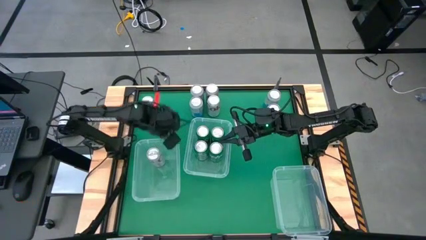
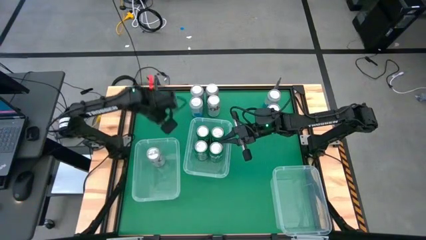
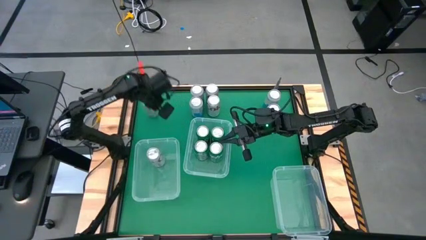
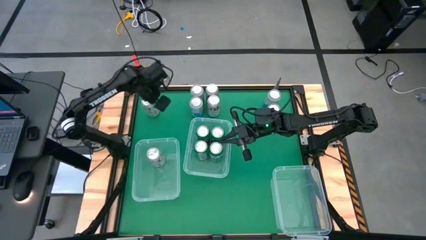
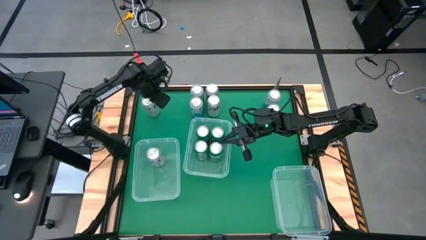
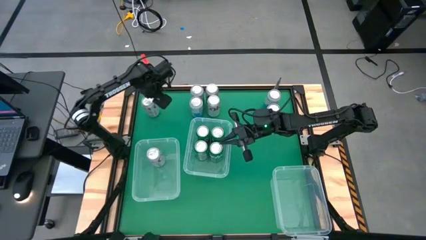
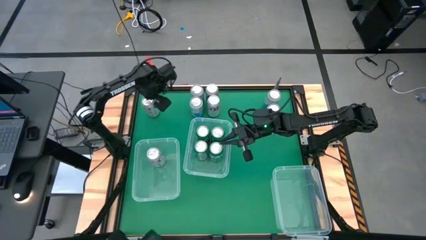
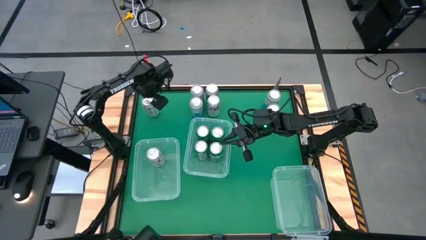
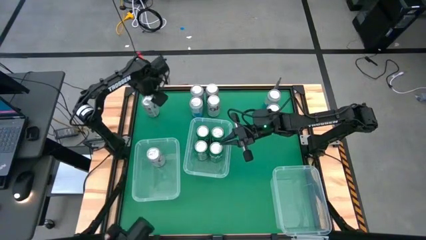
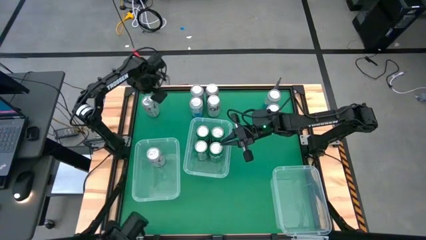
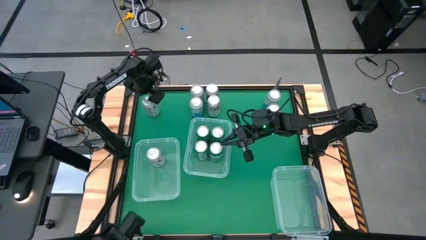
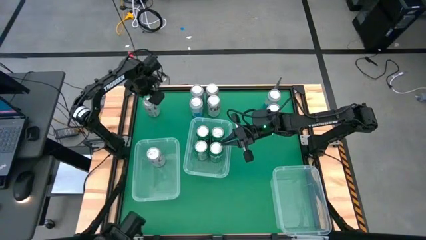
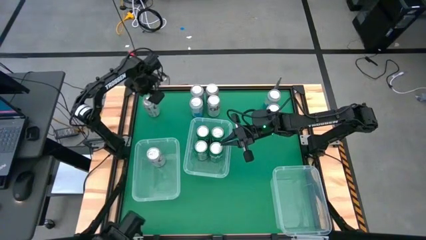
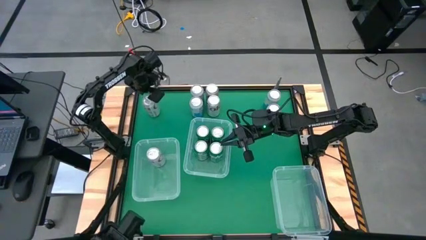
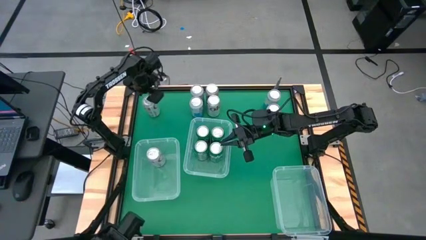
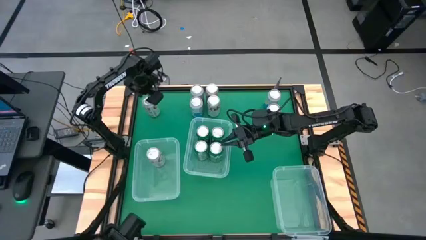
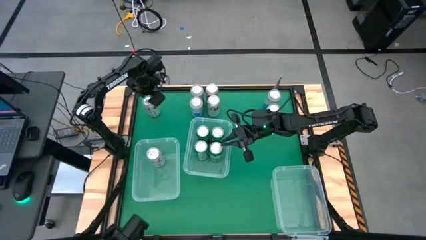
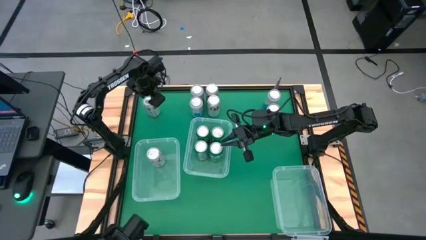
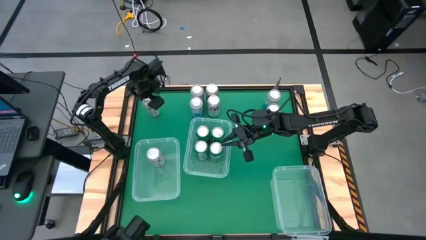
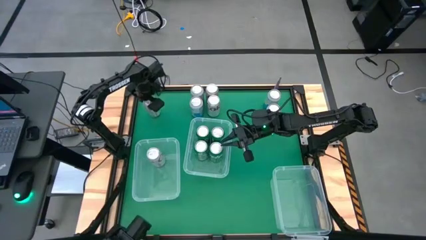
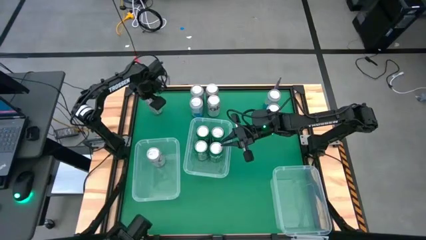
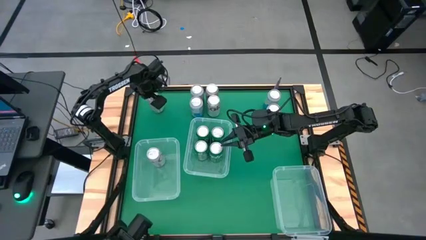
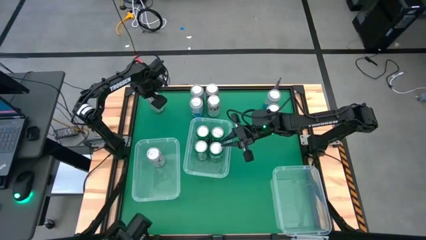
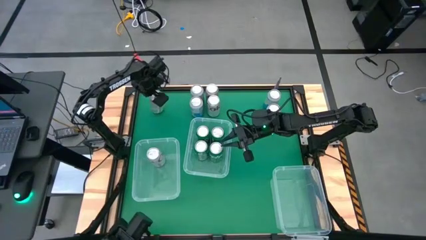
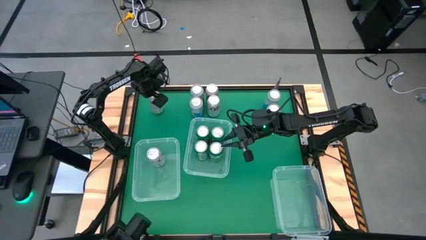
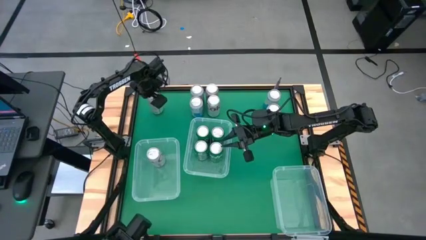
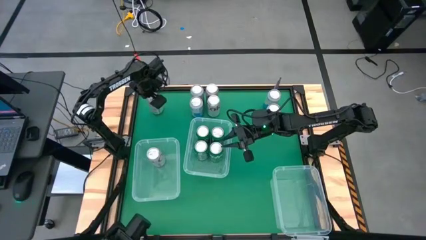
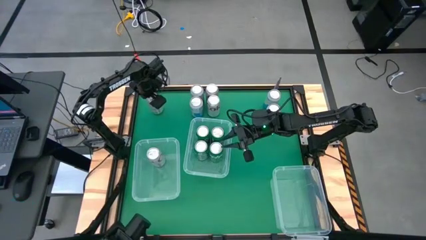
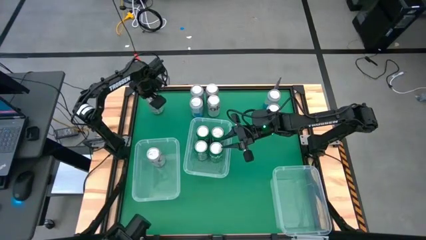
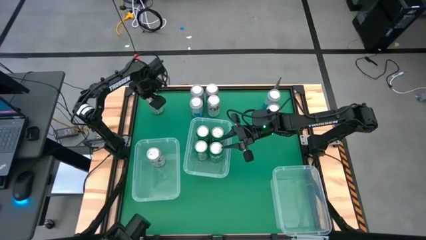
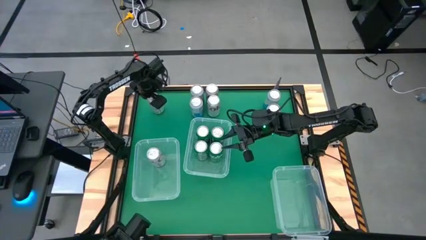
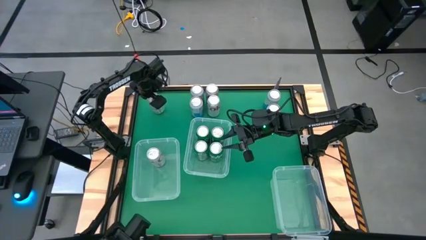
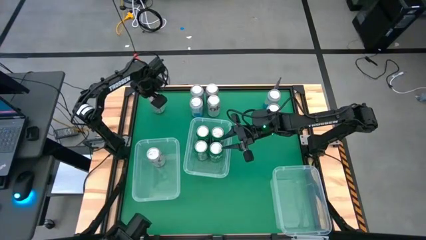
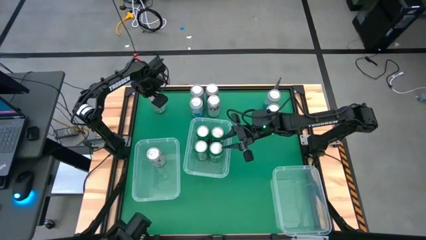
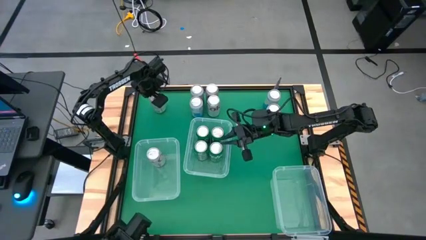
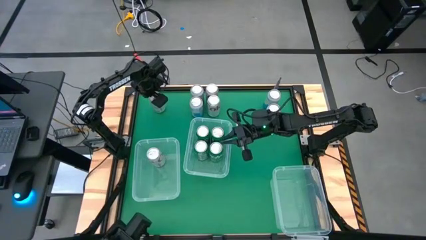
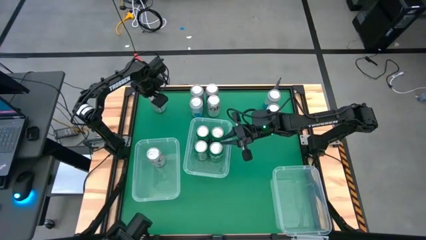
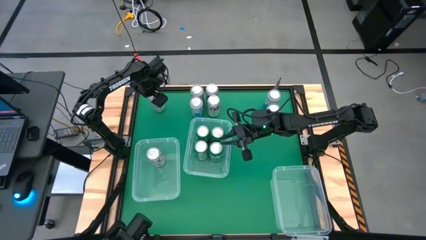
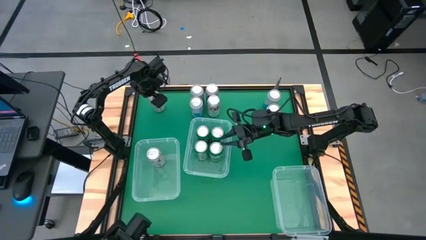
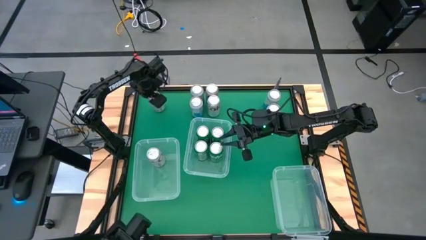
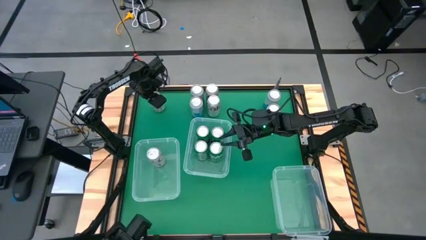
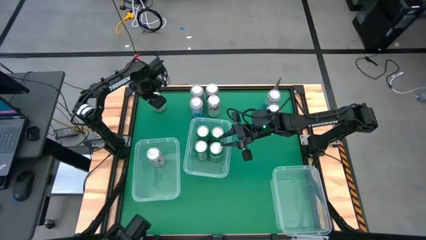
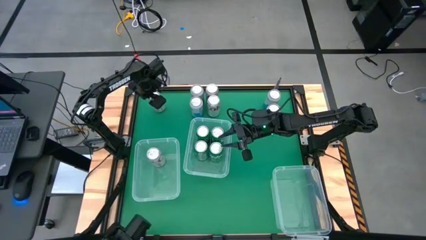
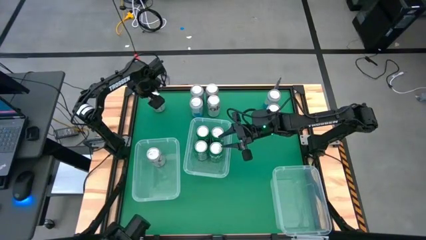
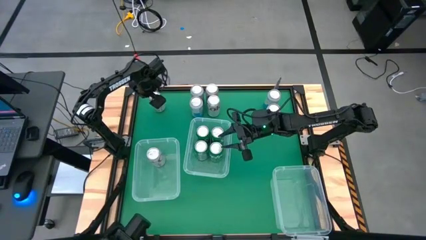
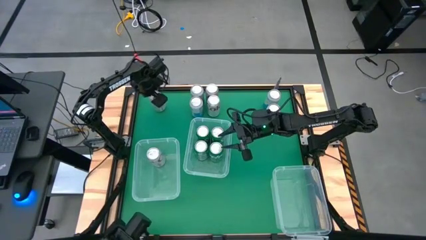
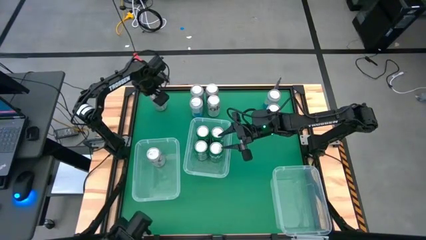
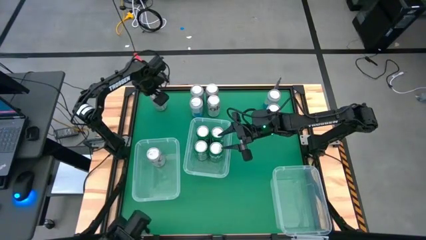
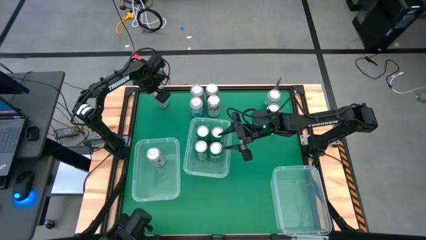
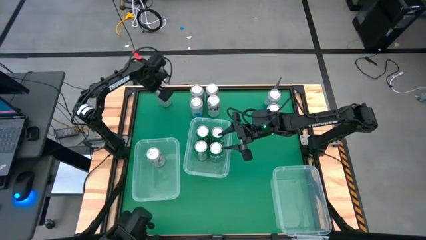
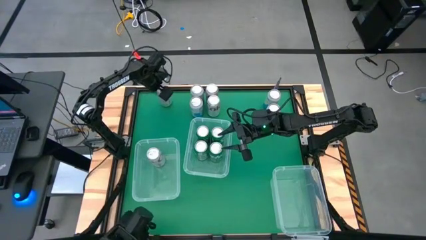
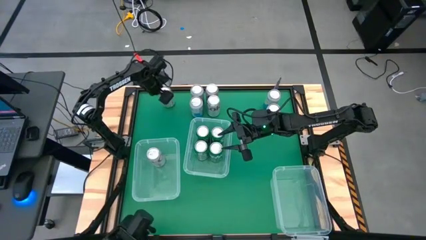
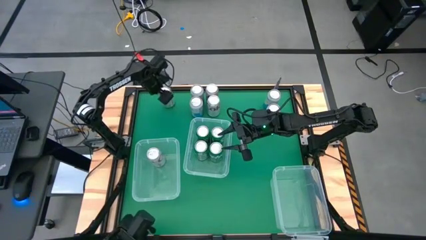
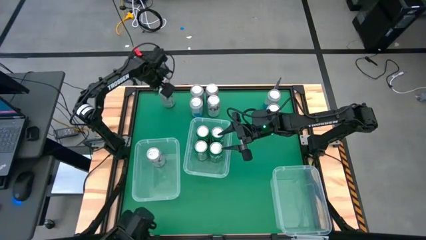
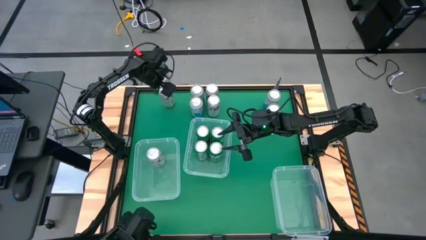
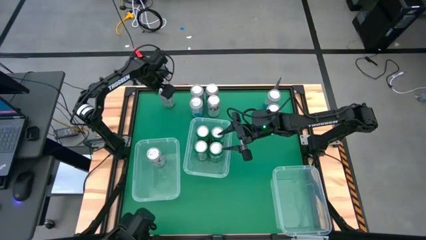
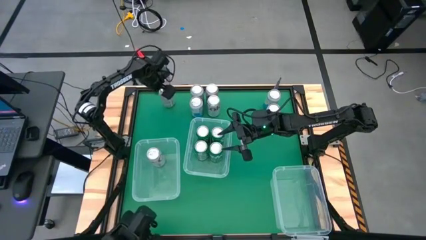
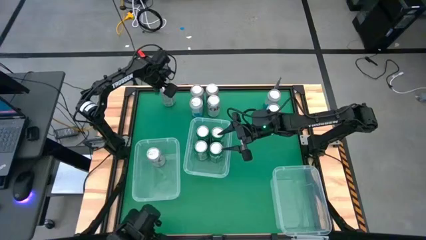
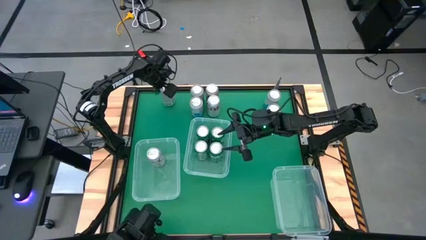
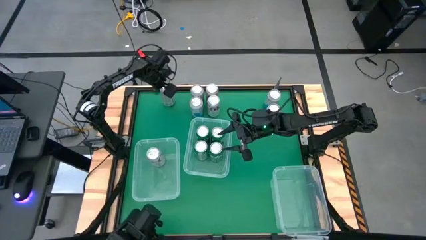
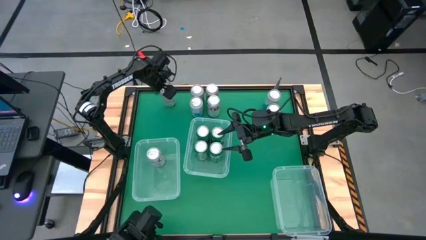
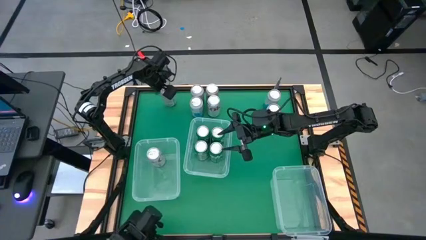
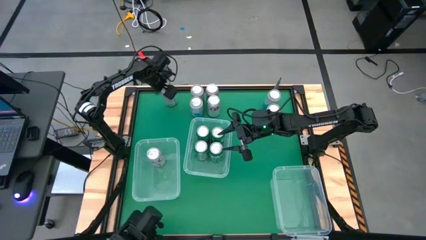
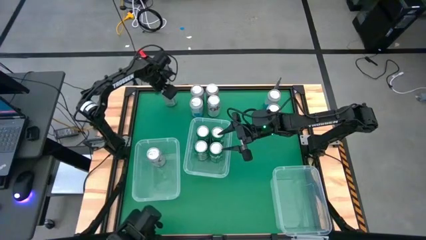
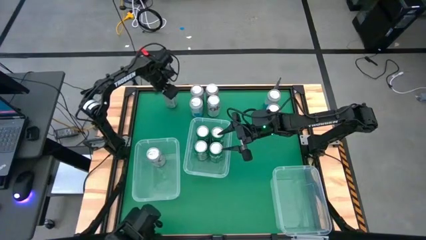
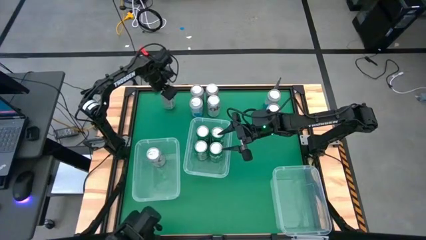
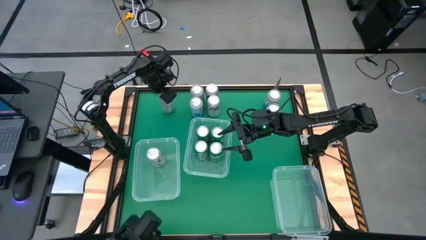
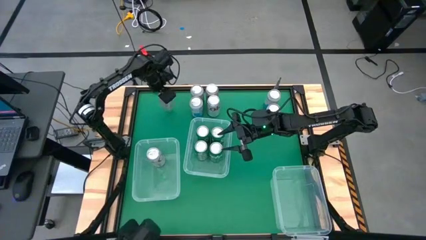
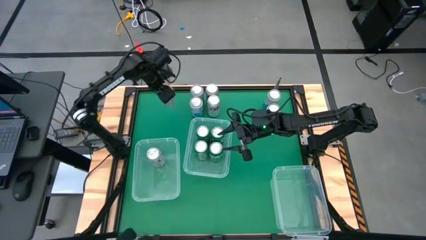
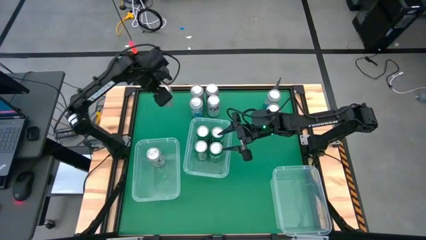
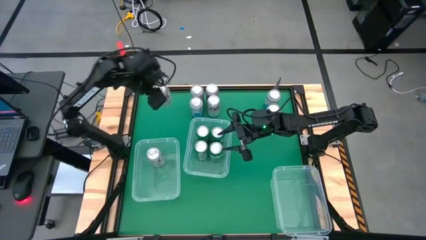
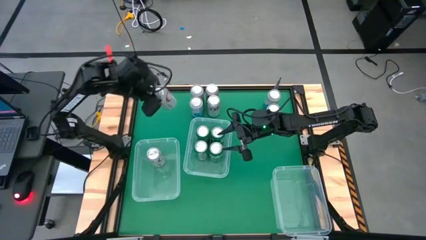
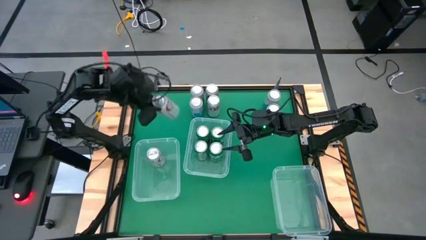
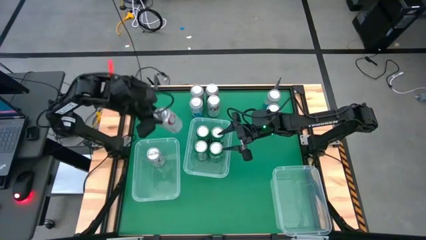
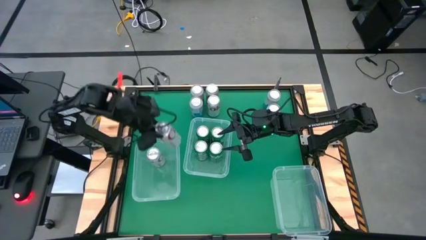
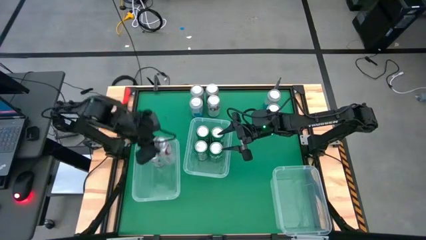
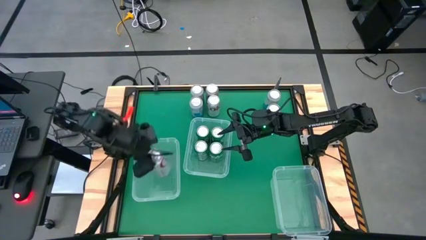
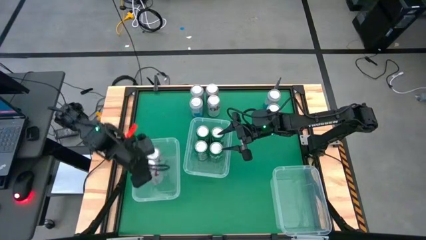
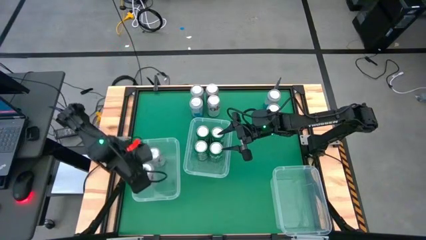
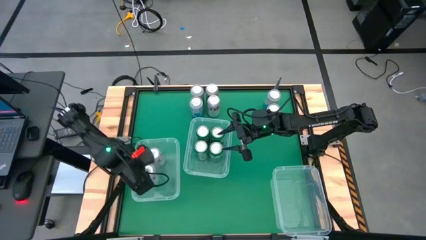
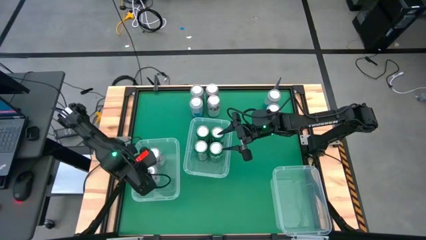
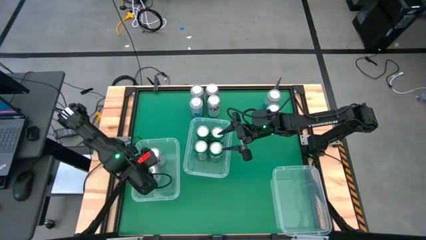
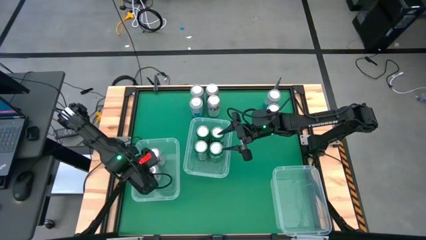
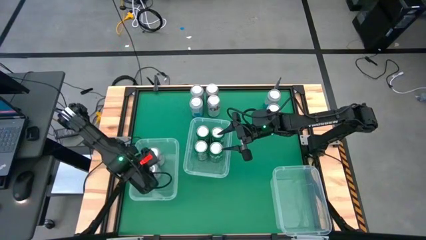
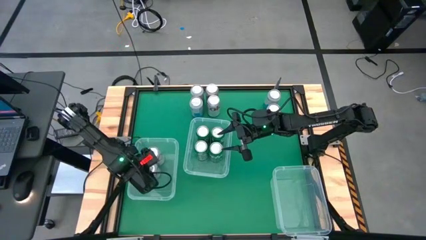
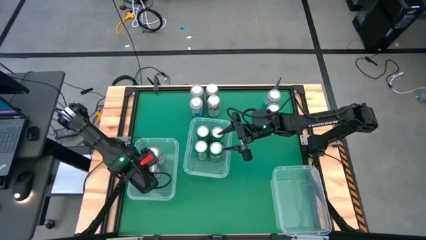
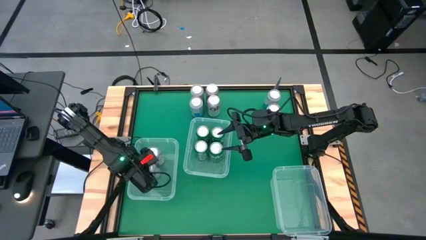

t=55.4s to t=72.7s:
Task: Sort soda cans
Put the silver soda can into the bottom left bin

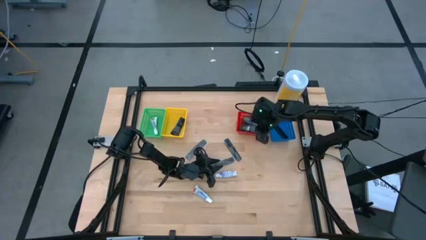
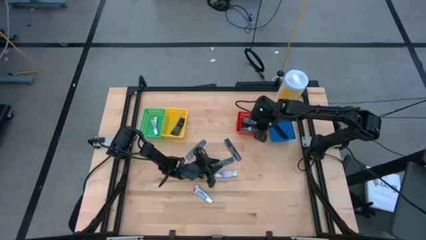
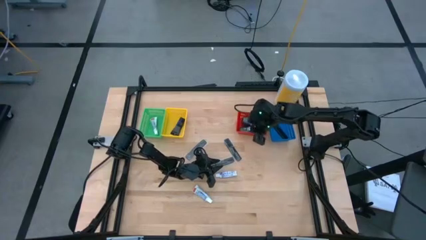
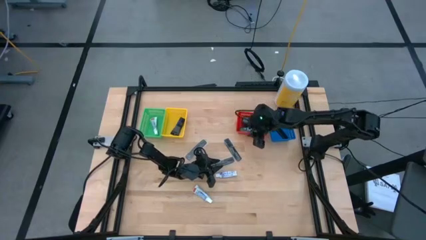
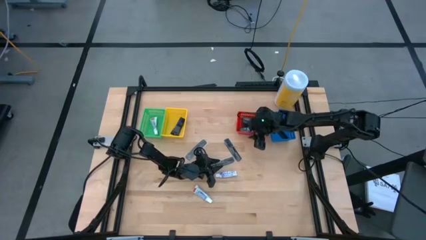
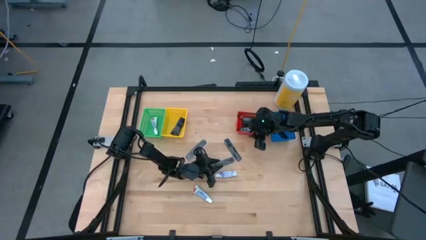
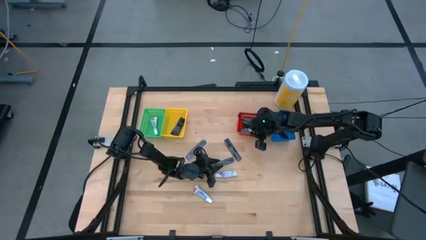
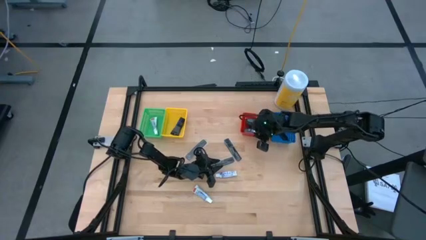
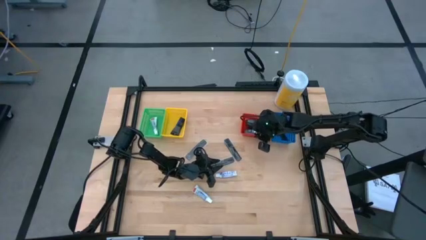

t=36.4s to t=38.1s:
Task: Pick & Place Travel size toiletries
Adjust the red bin
